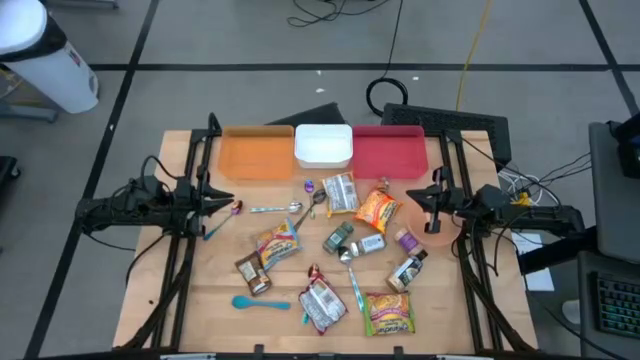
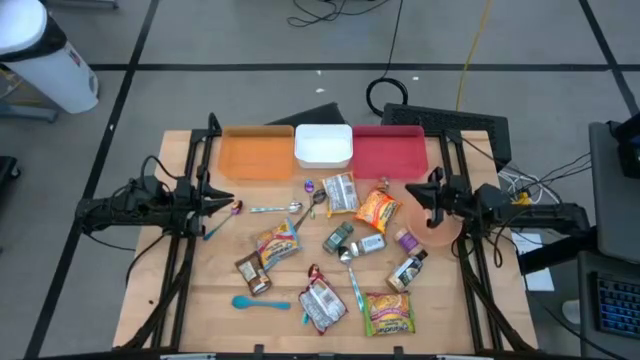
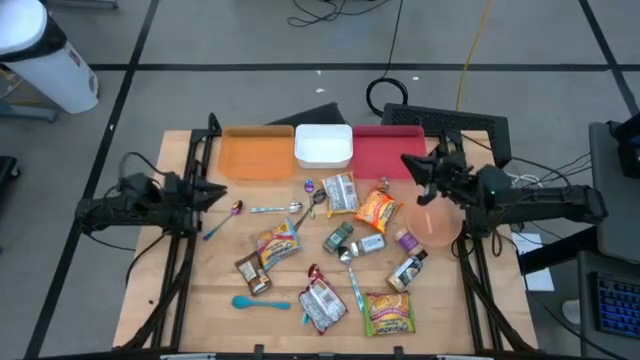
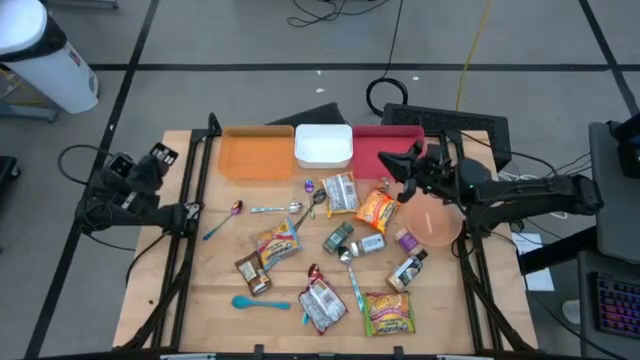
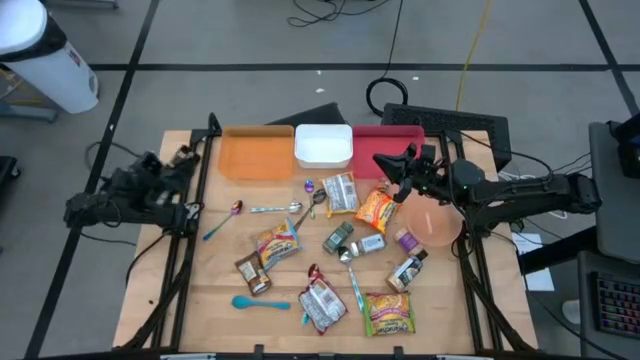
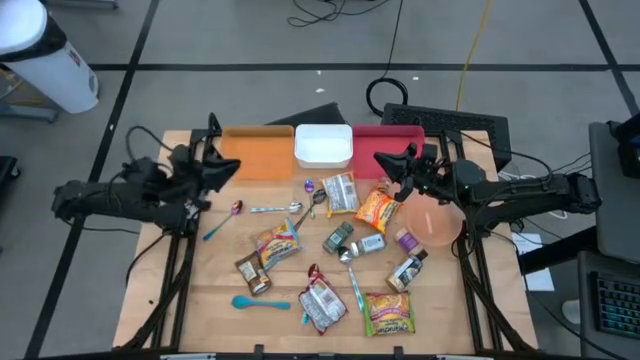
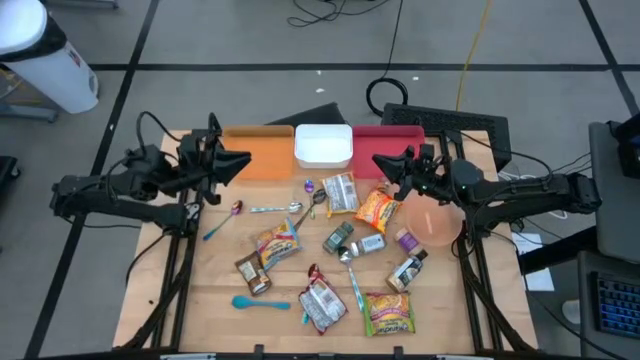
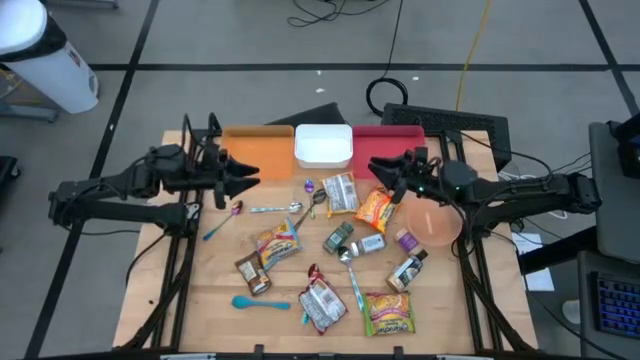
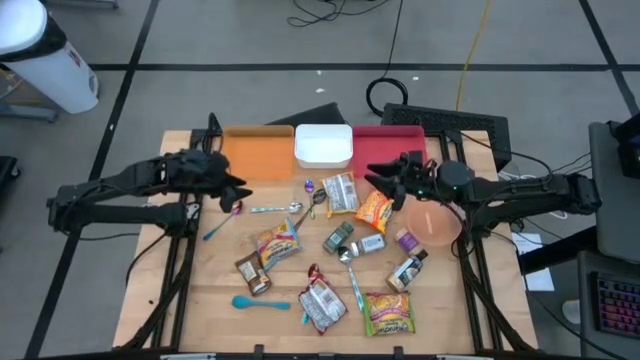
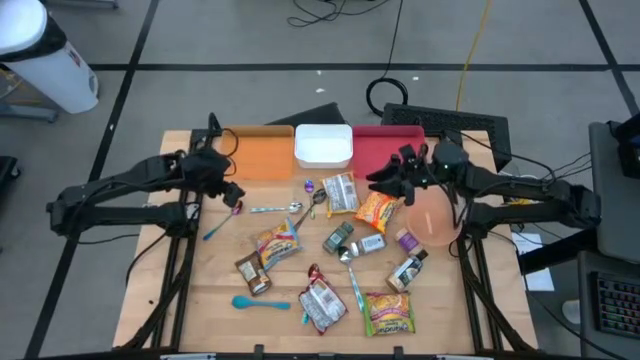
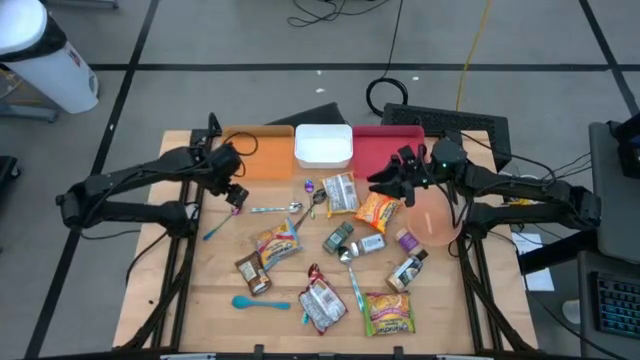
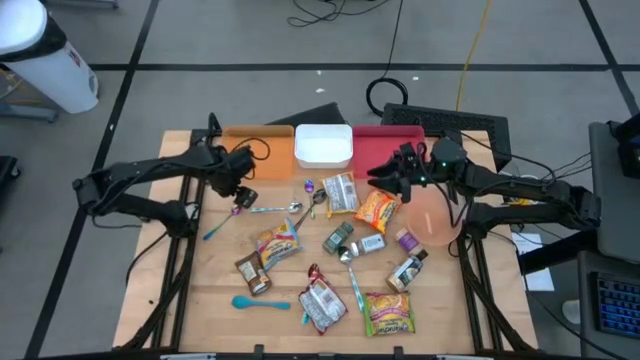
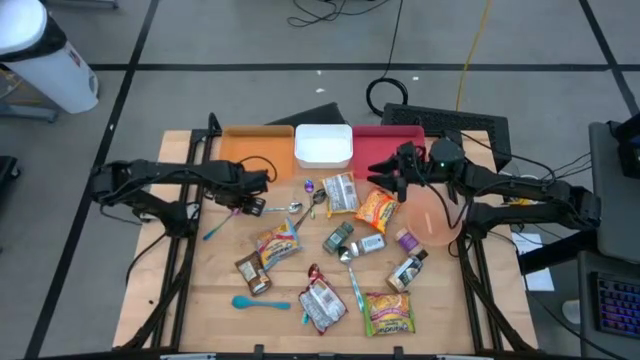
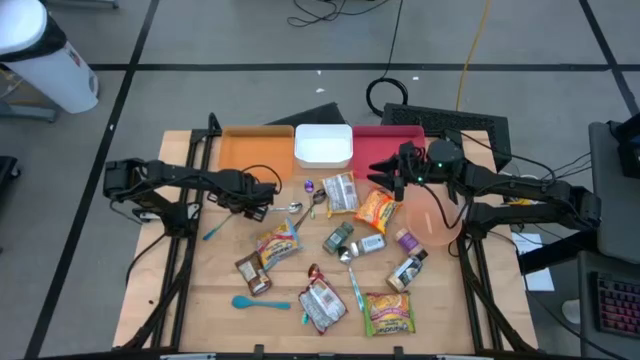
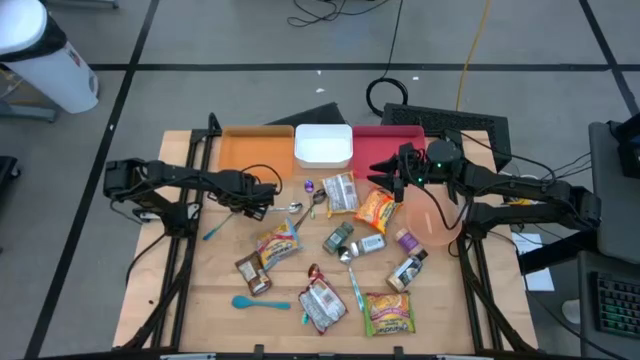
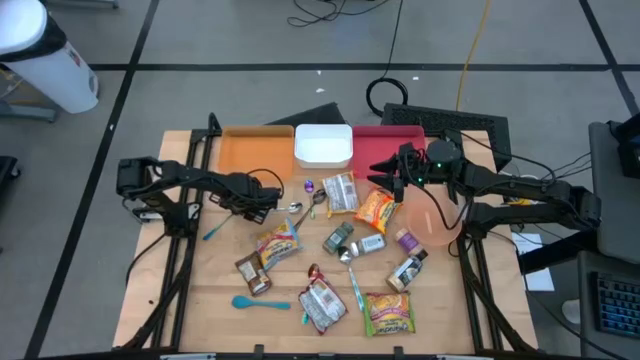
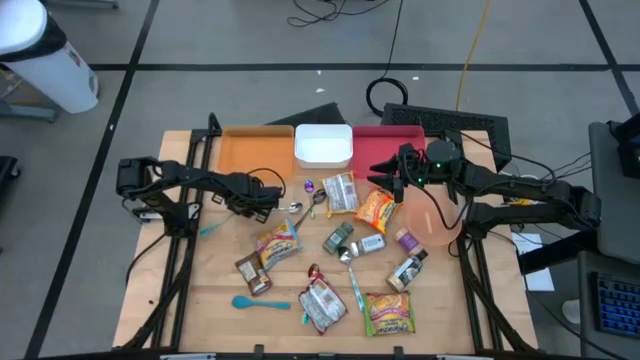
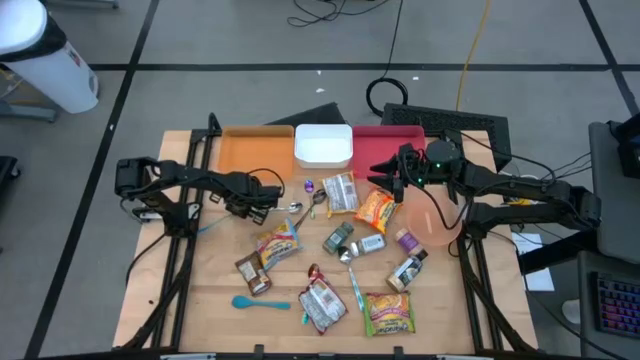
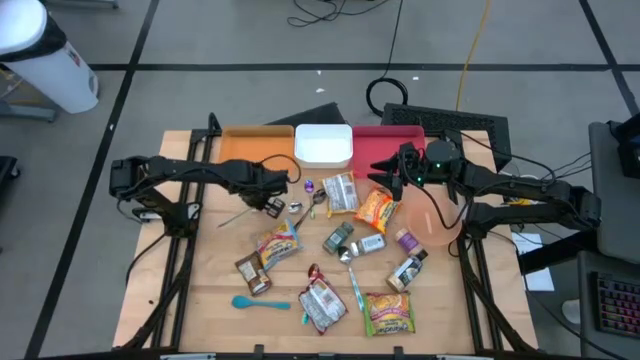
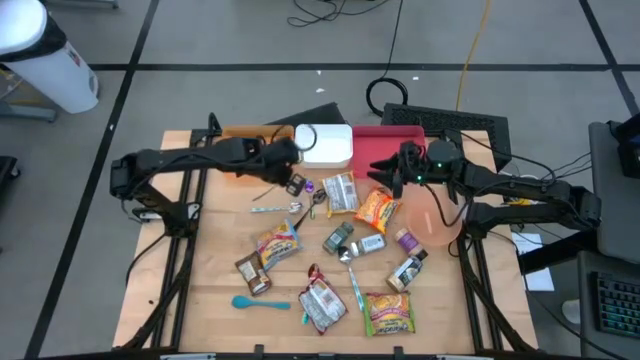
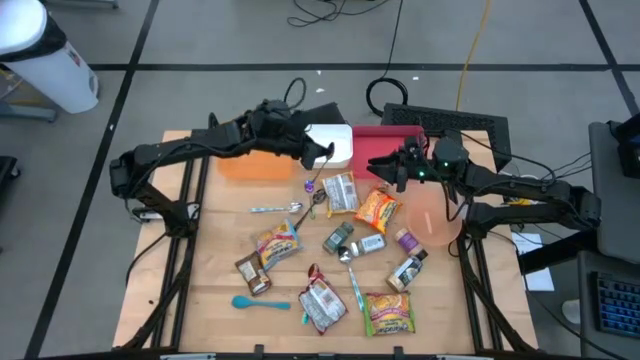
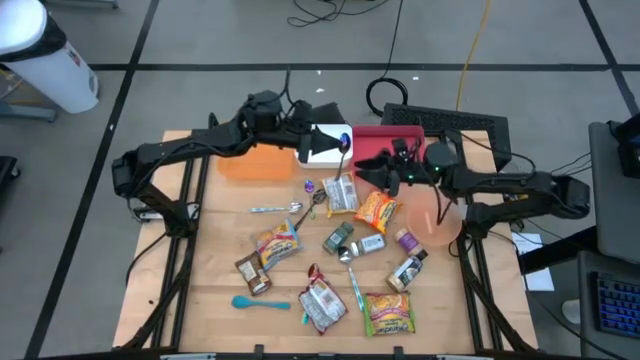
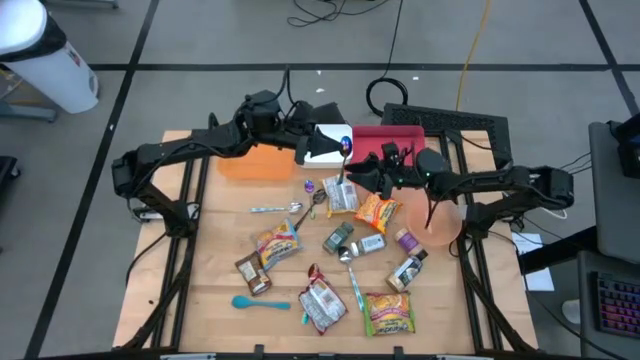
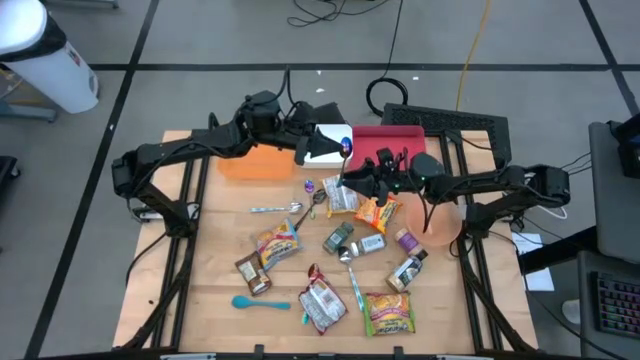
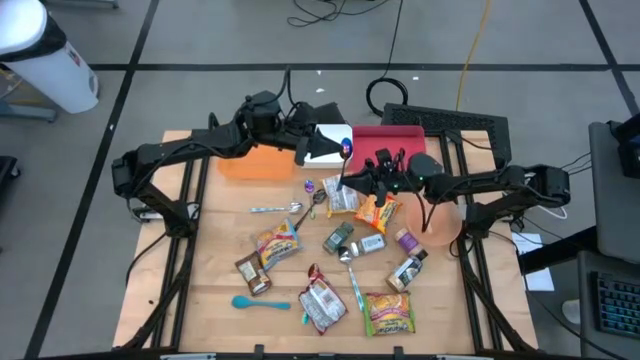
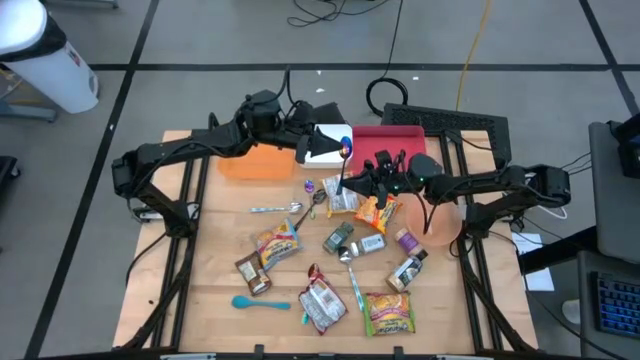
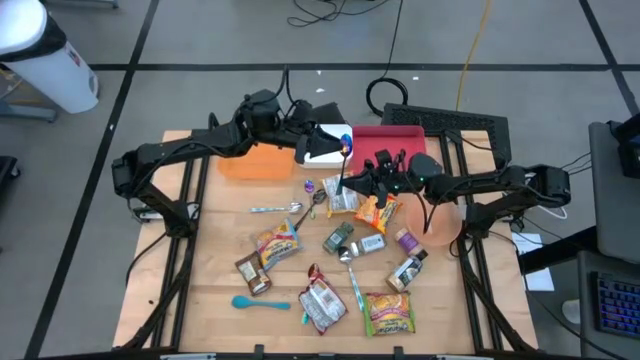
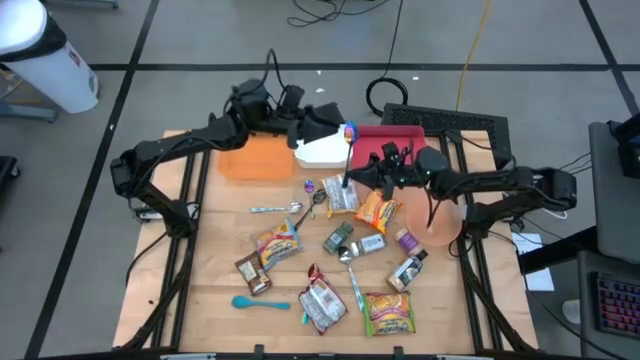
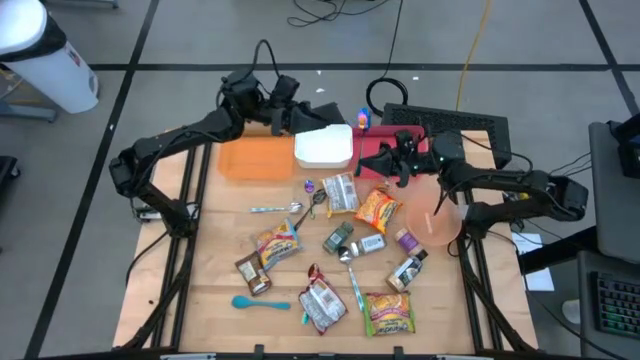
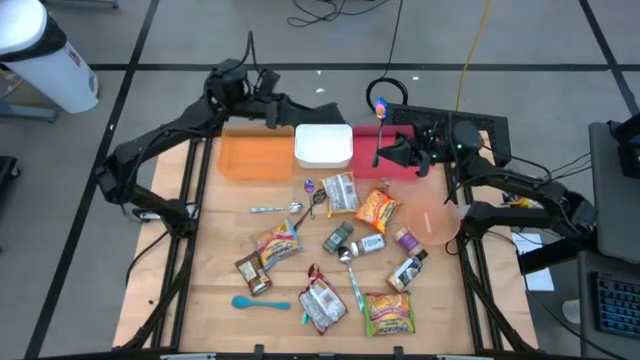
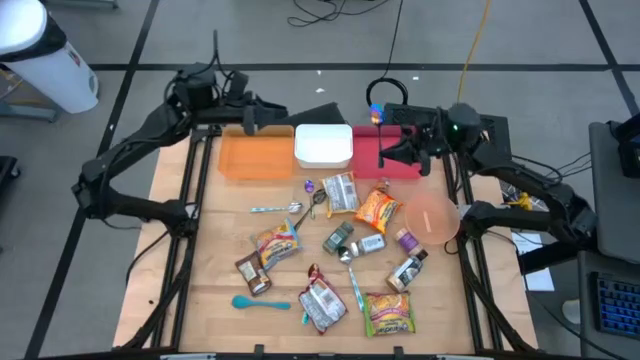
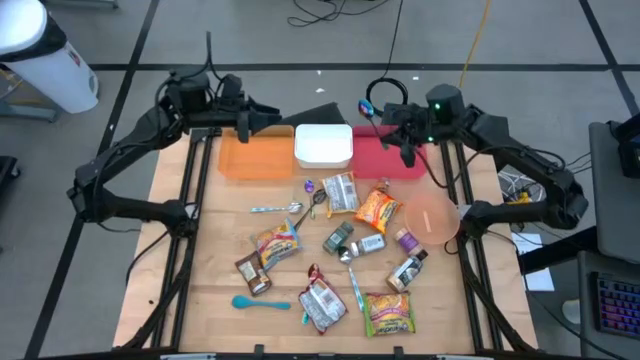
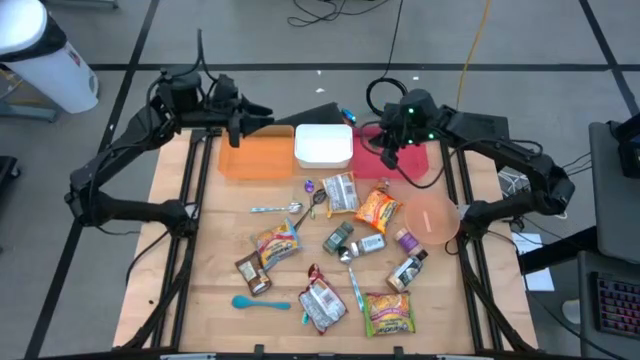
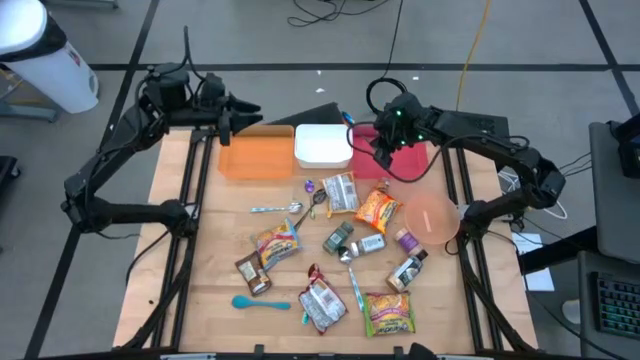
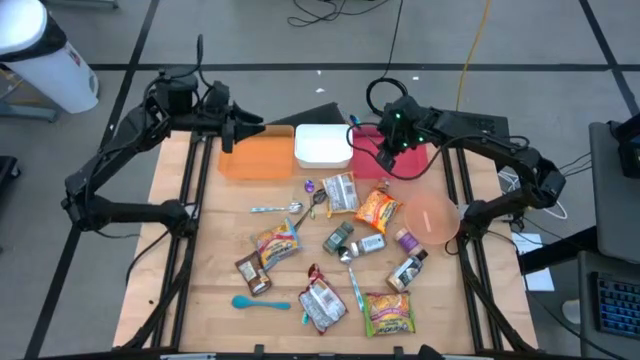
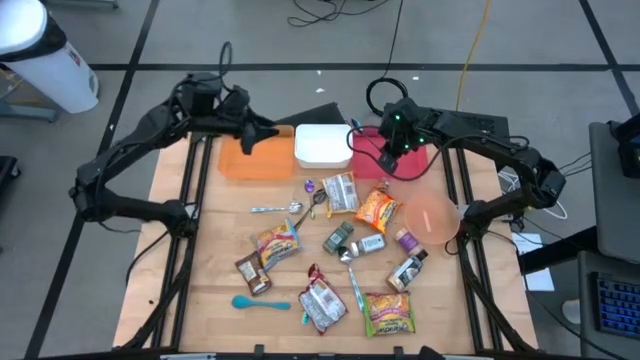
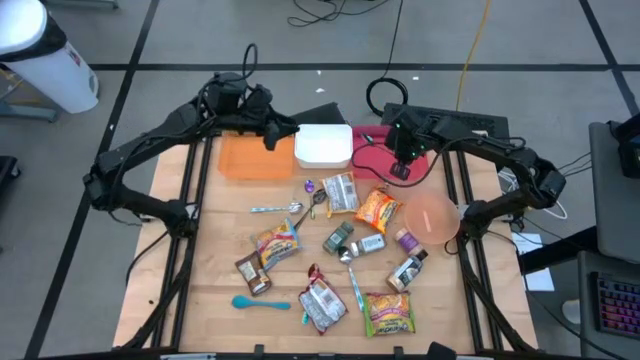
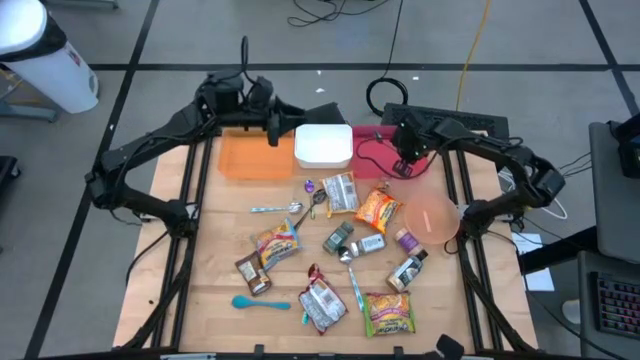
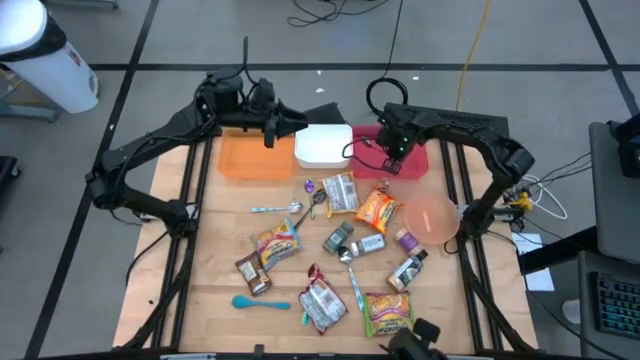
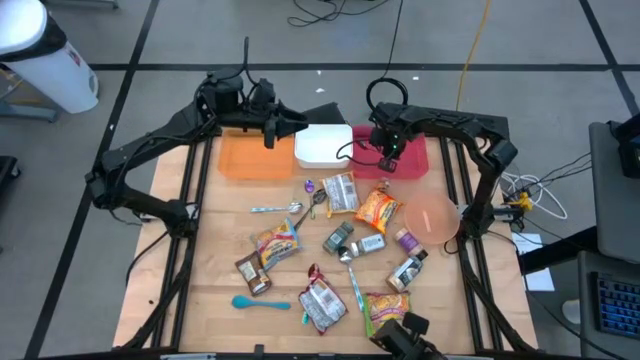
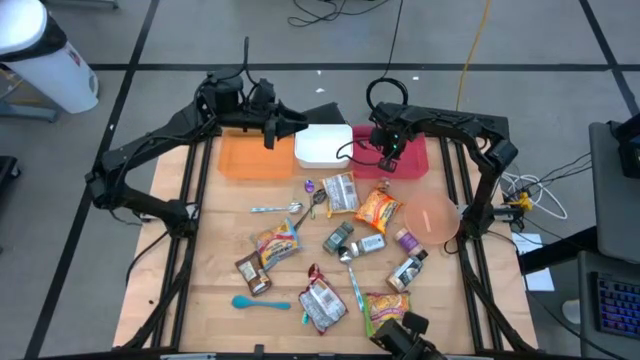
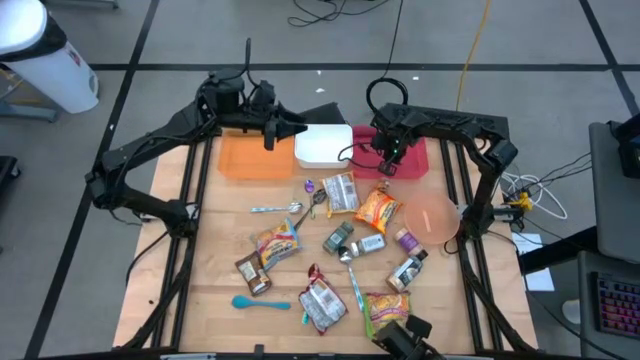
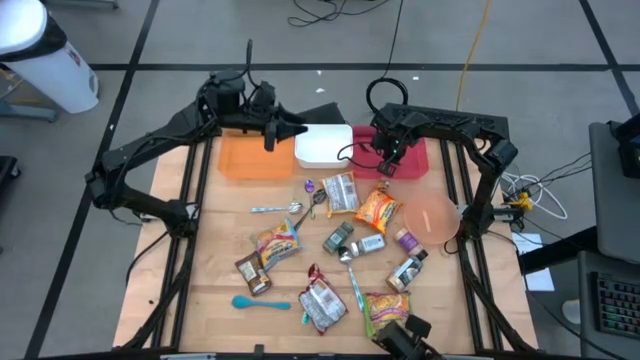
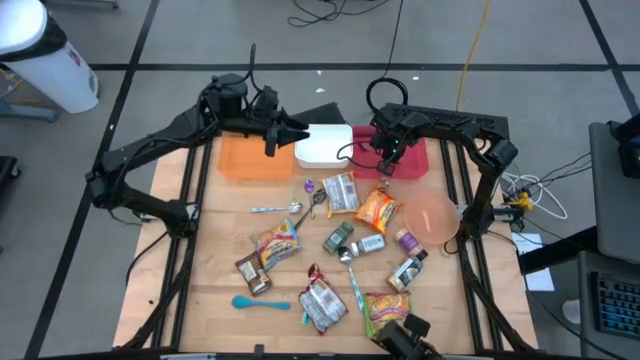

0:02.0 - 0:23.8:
Task: Pick & Place Food Item
Put the violet spoon into the red bin
